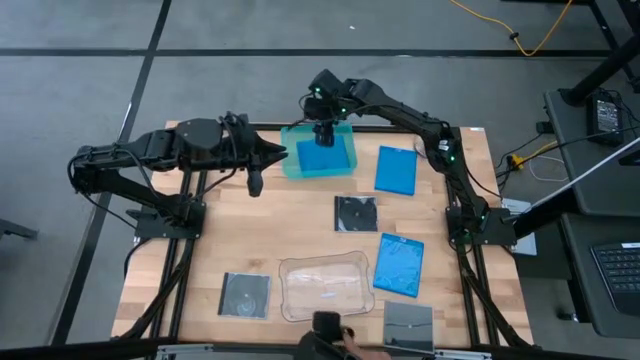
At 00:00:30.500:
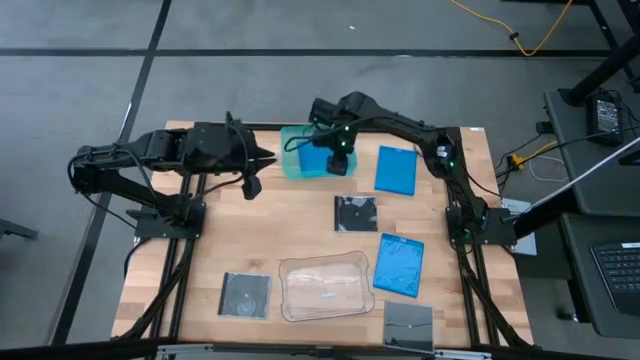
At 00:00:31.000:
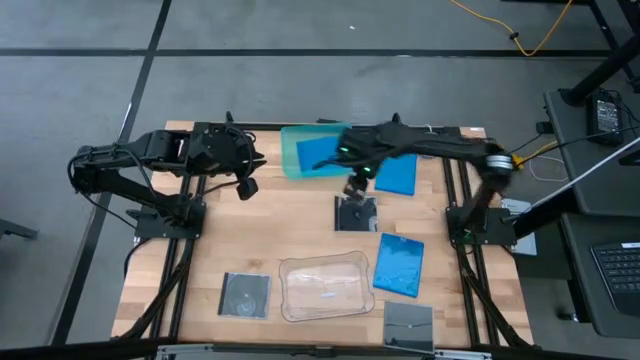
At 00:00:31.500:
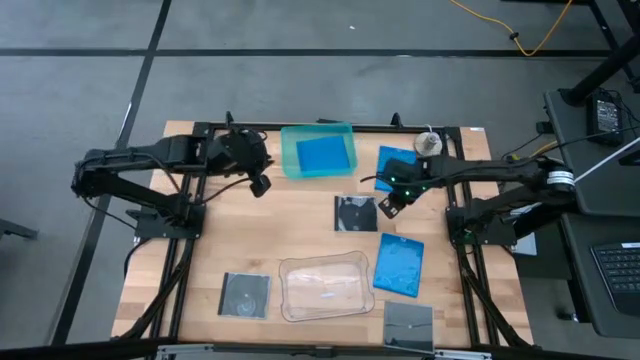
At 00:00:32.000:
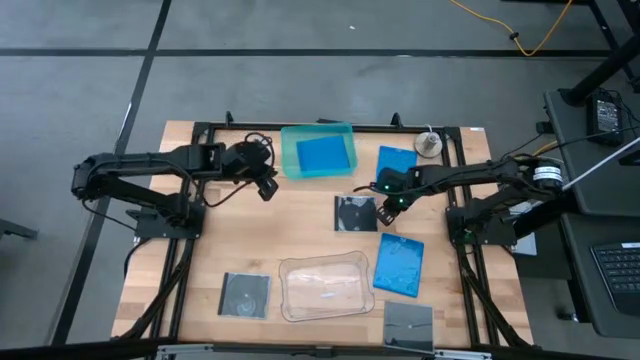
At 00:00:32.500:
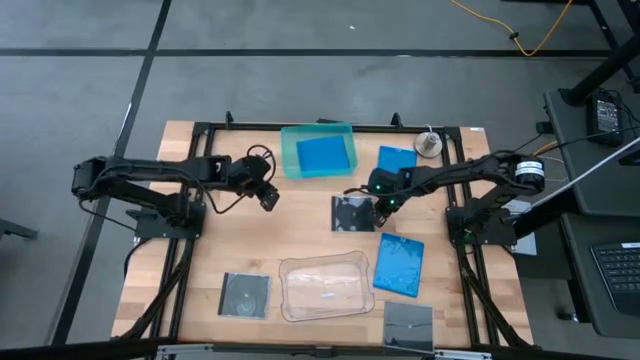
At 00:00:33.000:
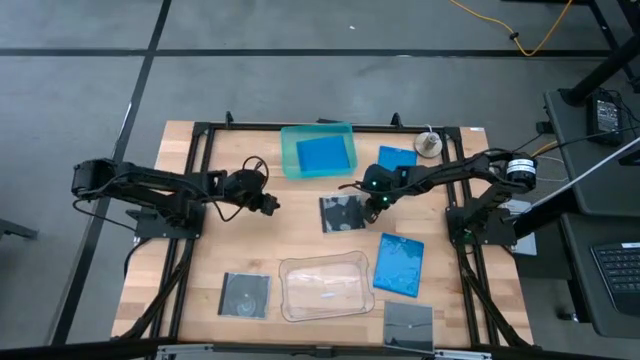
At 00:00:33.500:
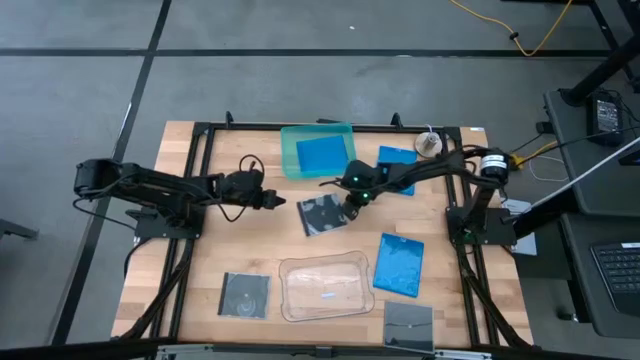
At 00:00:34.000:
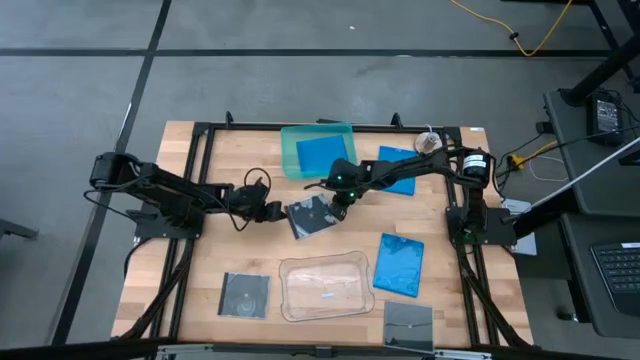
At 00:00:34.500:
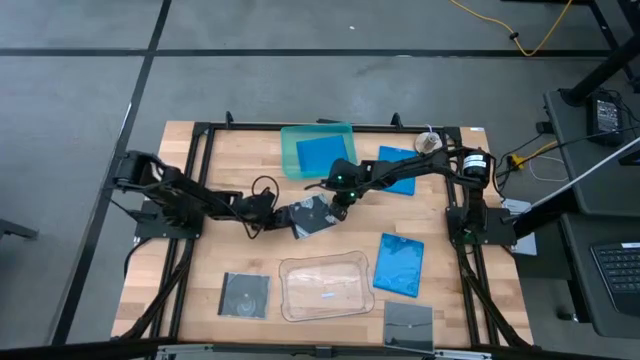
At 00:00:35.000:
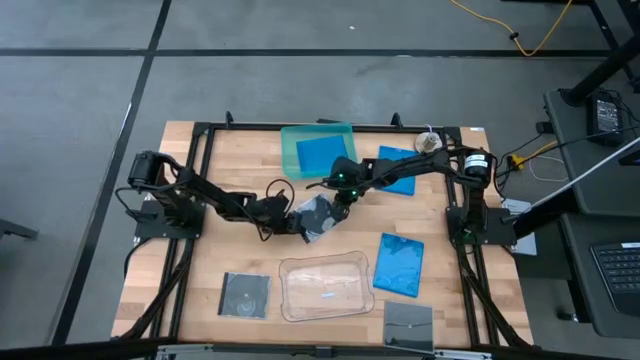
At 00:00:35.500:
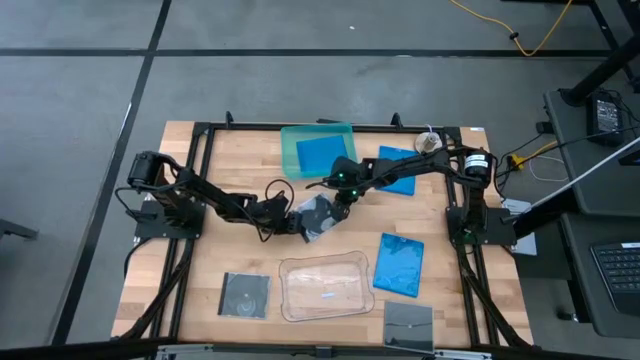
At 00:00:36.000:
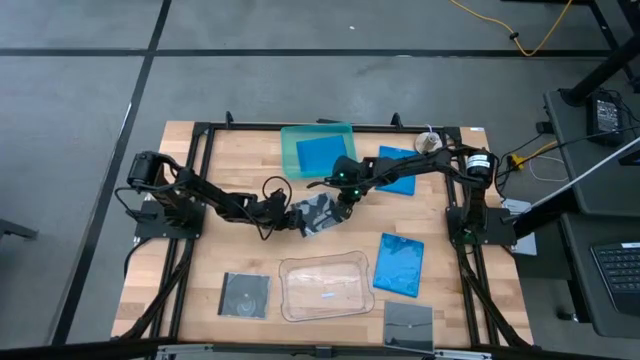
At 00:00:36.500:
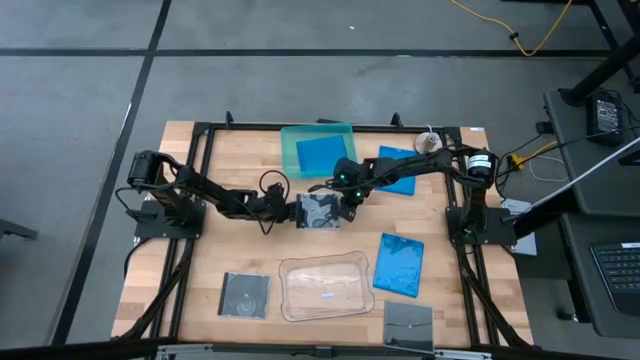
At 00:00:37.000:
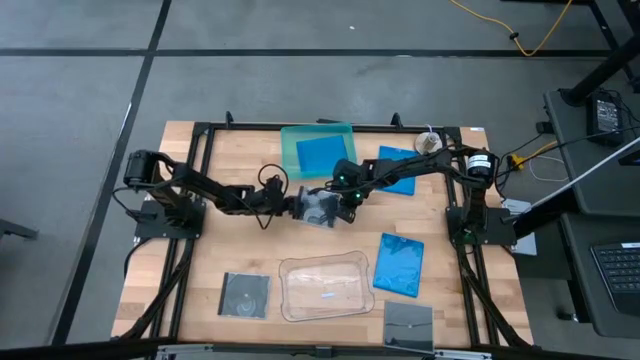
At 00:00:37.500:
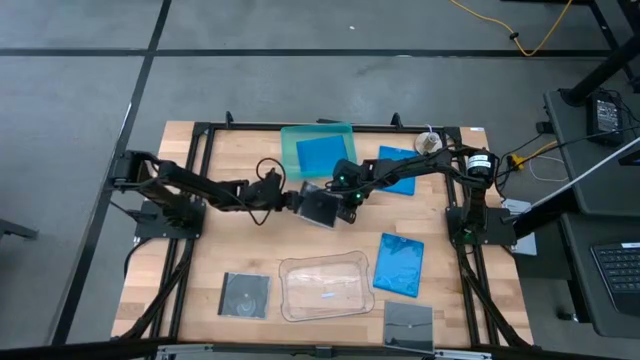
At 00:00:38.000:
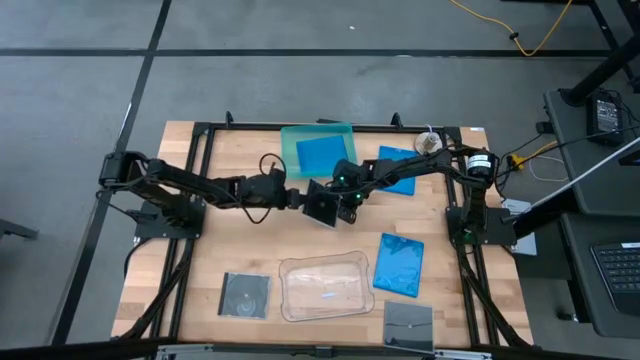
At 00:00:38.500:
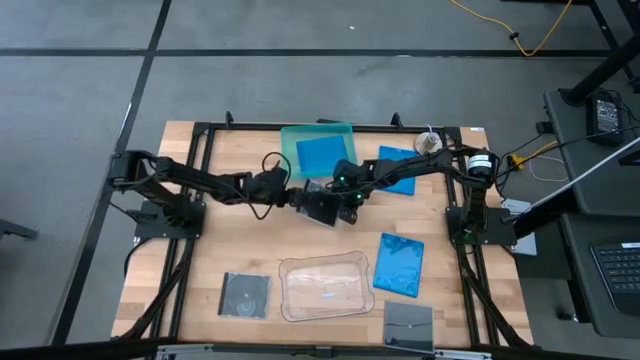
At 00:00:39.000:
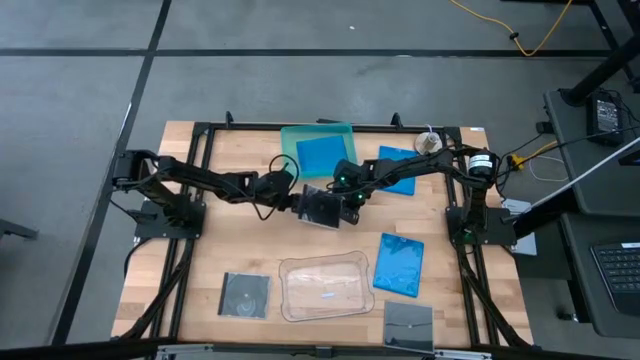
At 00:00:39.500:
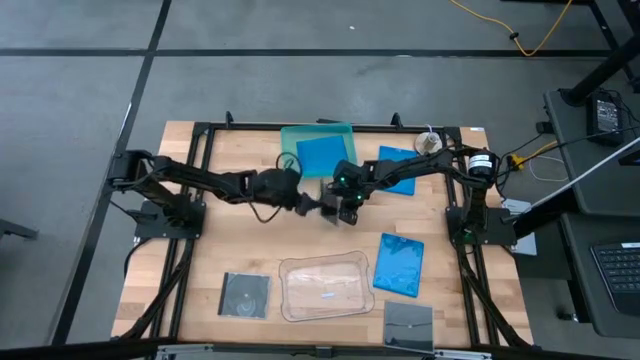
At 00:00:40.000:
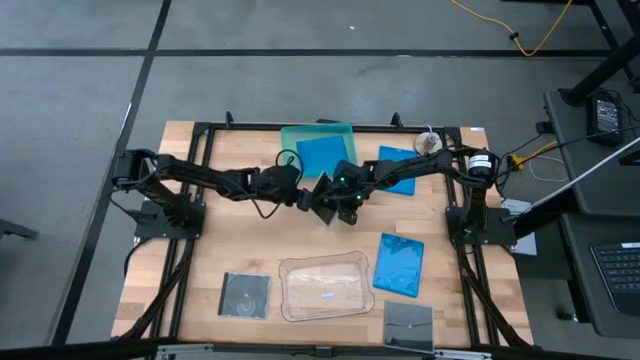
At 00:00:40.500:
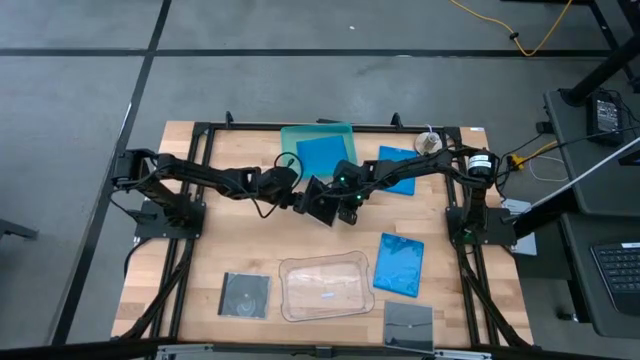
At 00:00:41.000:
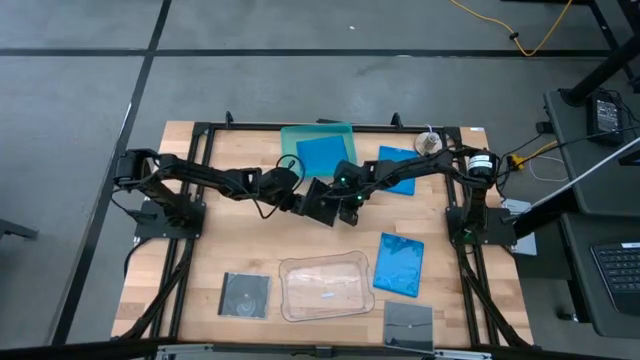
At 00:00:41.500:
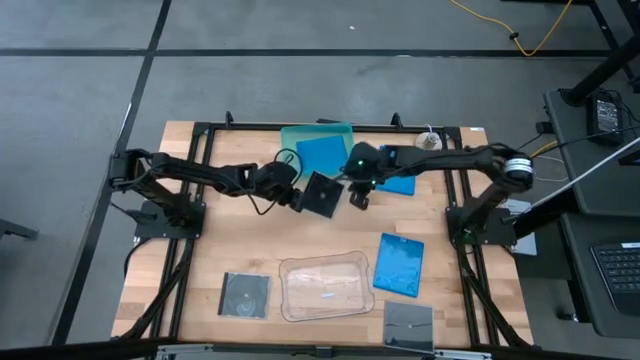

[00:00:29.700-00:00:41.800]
Task: Pick & place jewel cases by type
Put the top black CD case into the transparent bin

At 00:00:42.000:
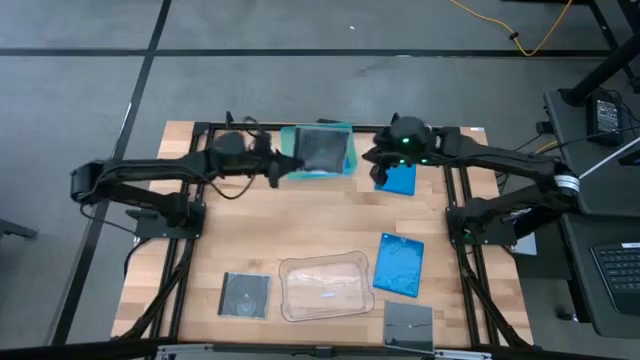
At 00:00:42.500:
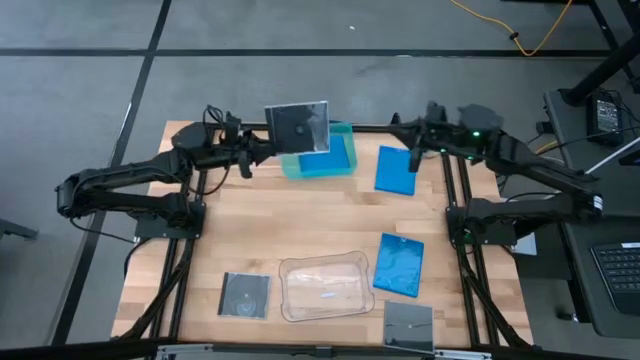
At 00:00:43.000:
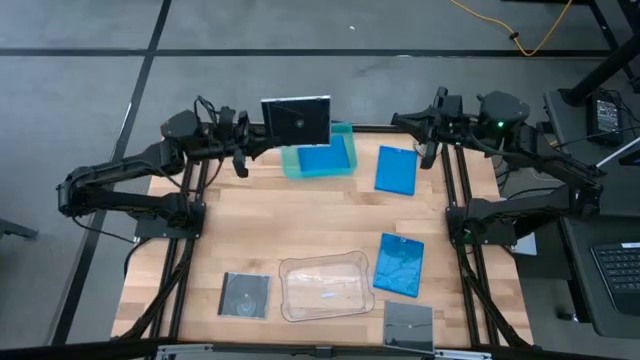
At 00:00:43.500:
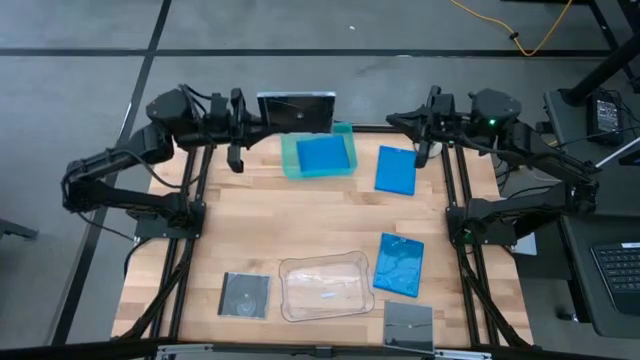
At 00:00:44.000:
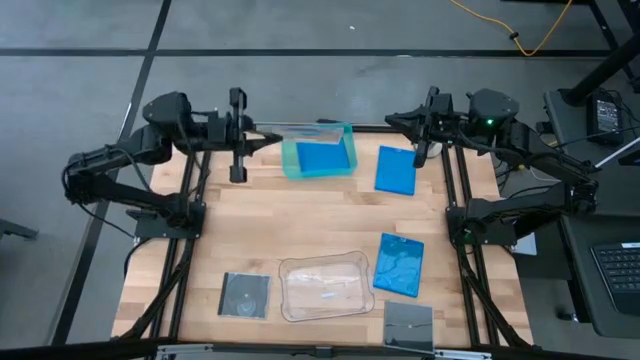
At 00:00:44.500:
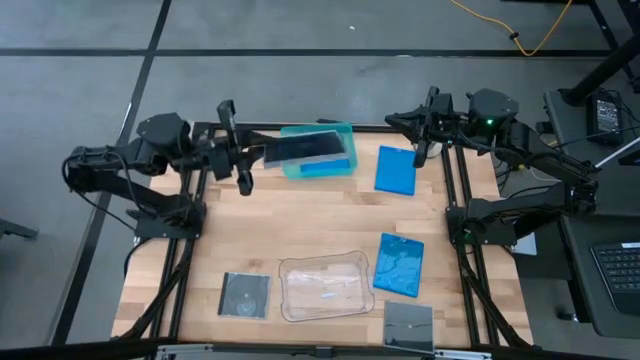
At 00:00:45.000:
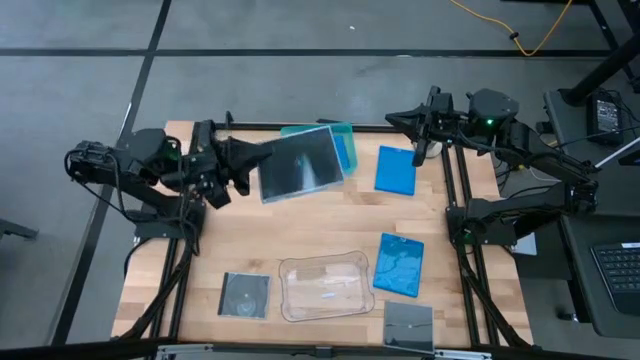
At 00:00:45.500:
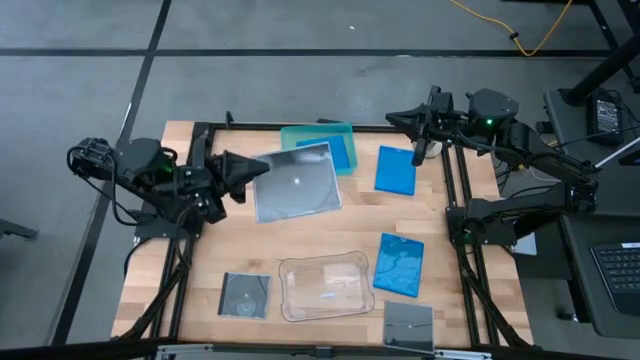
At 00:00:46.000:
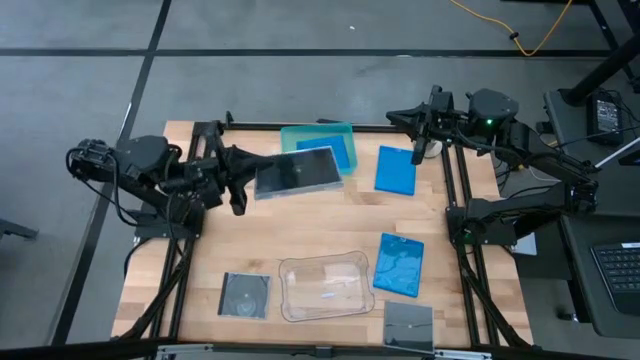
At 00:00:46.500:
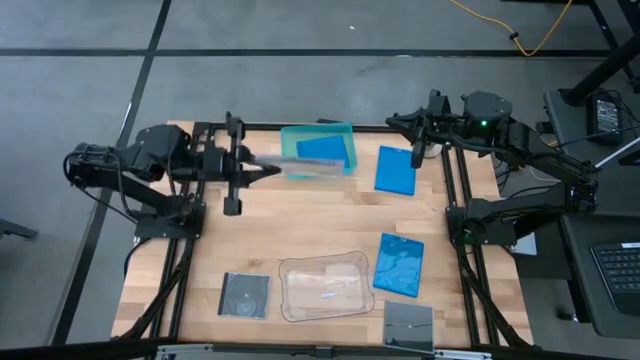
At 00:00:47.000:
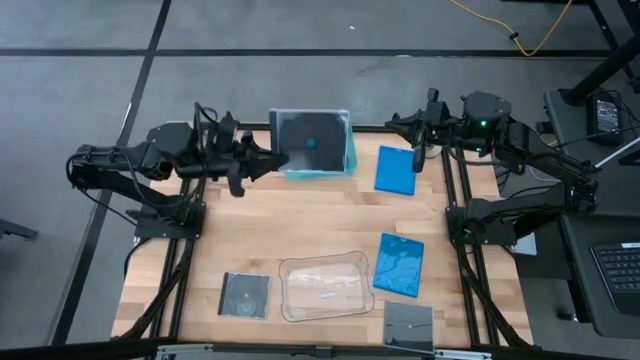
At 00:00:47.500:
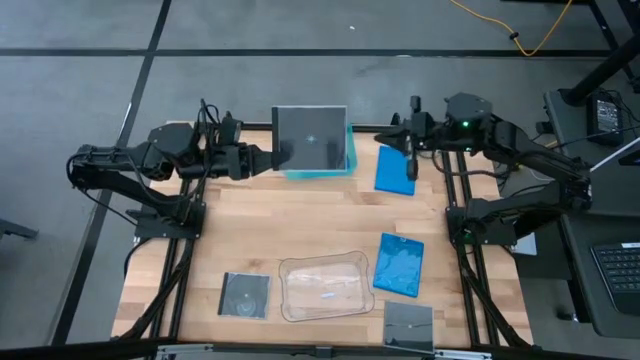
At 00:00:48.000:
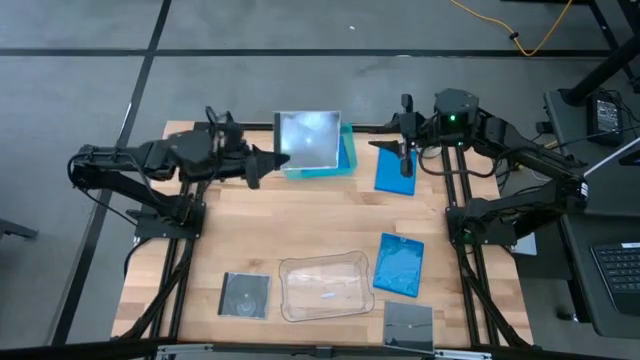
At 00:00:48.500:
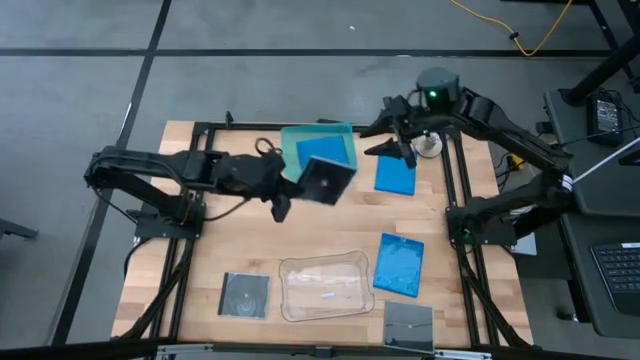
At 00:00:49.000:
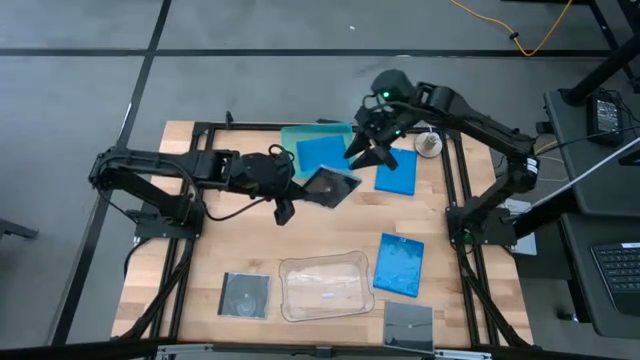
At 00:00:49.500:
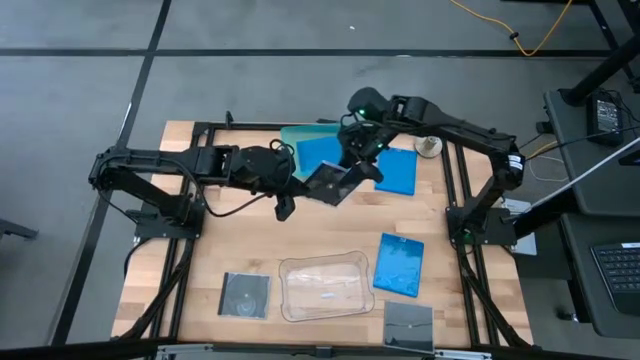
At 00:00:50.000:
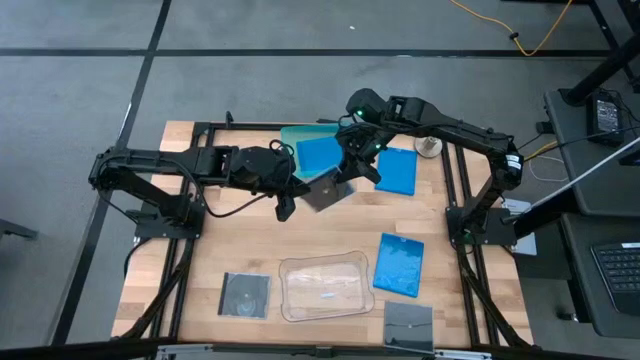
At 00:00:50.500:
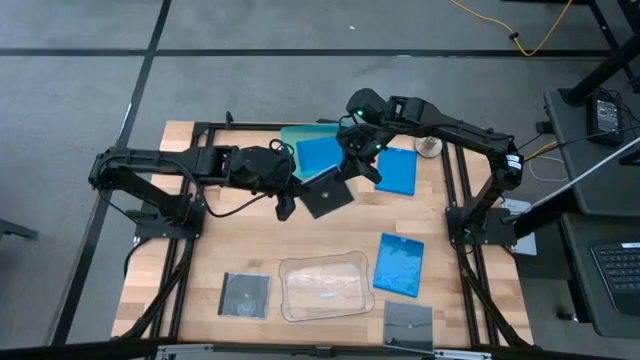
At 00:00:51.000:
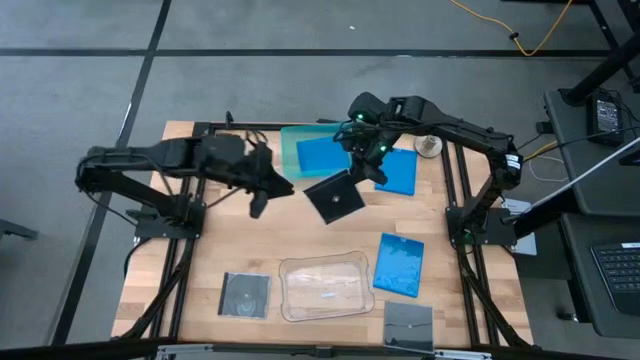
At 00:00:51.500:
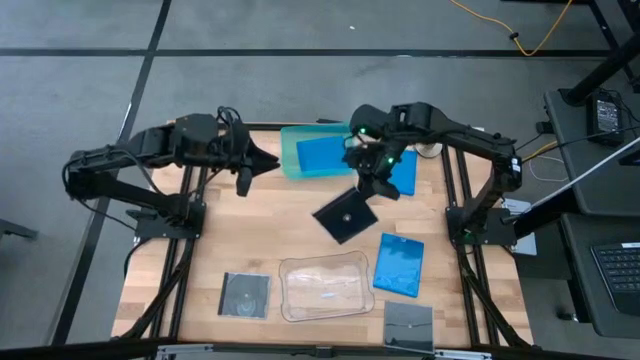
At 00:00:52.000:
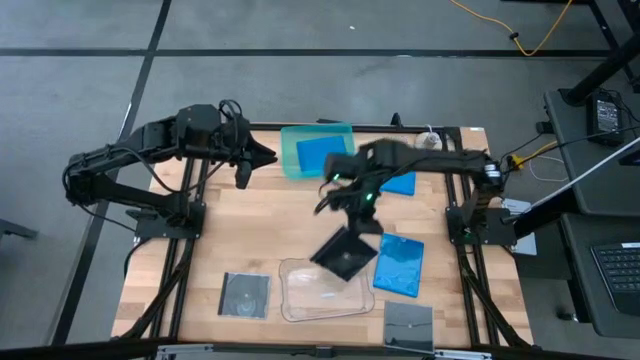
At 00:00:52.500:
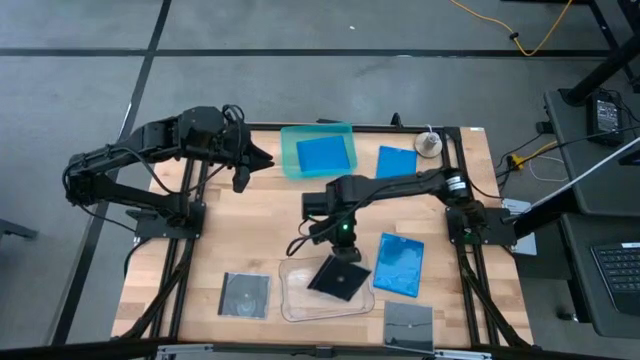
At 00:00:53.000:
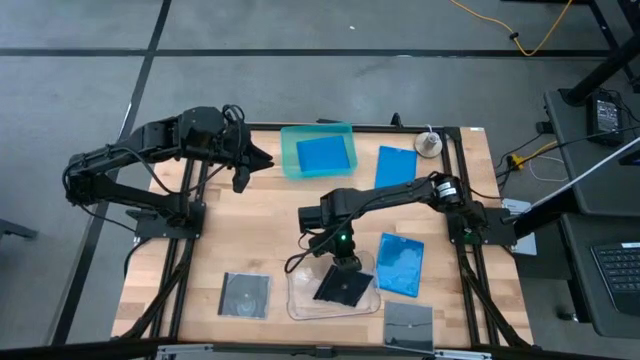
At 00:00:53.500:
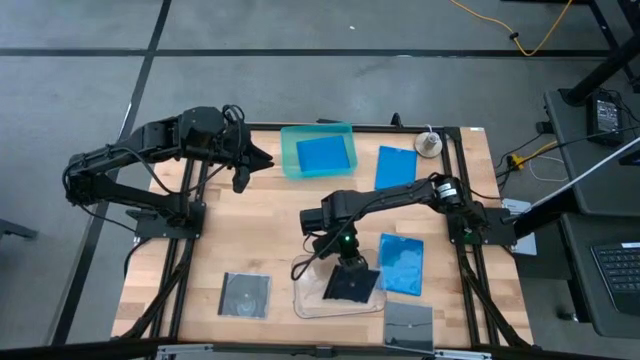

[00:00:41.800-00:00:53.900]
Put the top black CD case into the transparent bin
